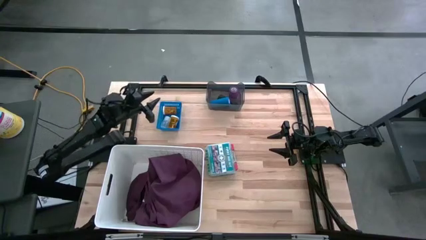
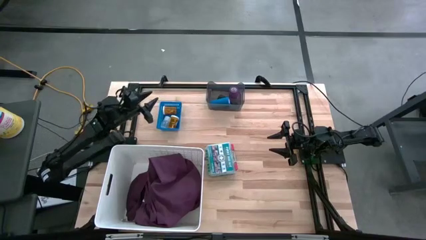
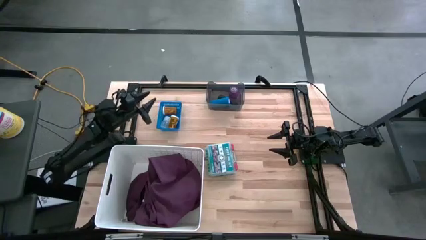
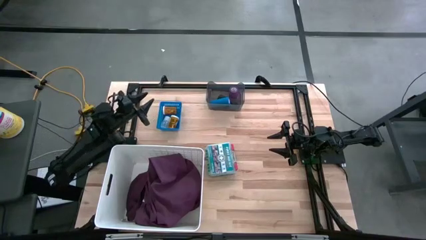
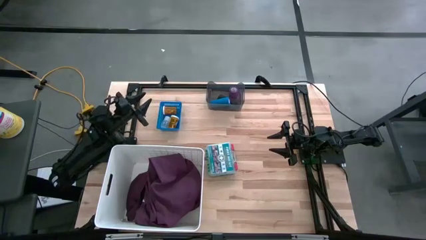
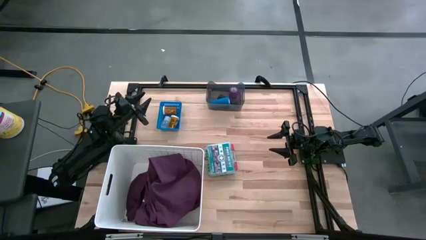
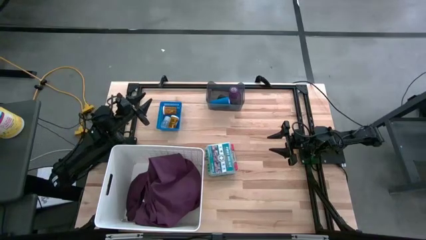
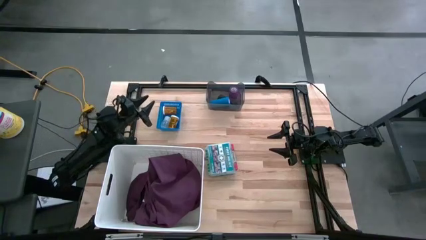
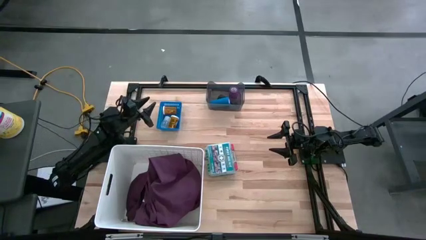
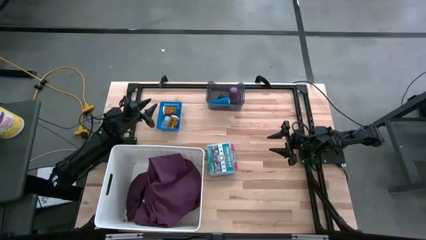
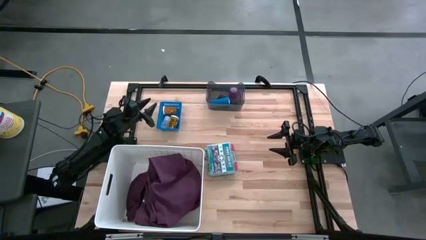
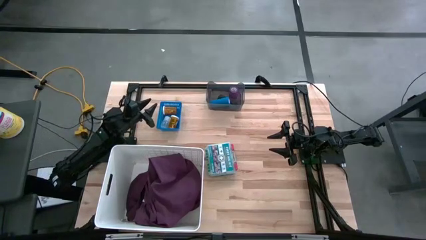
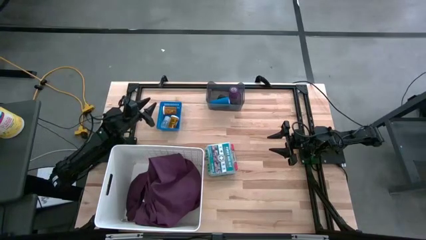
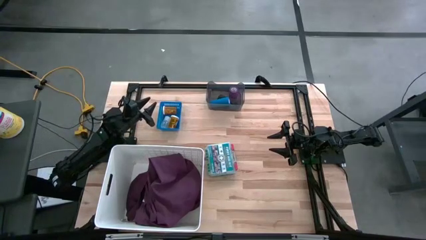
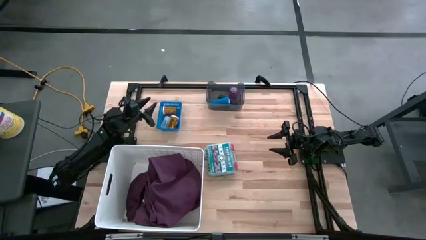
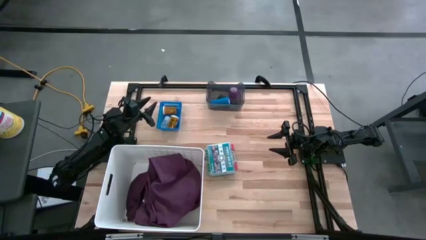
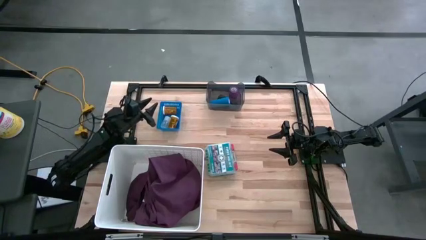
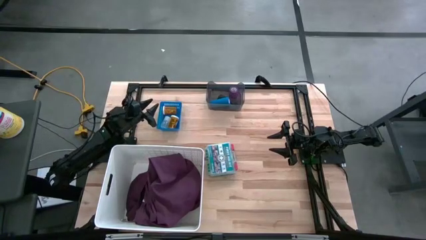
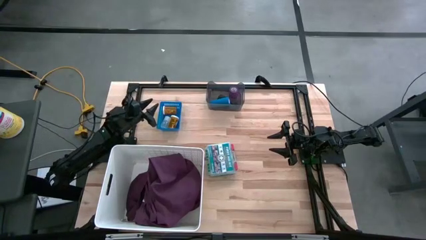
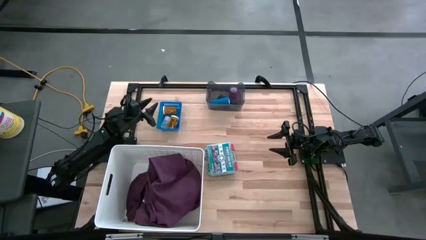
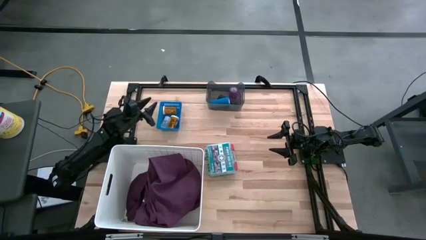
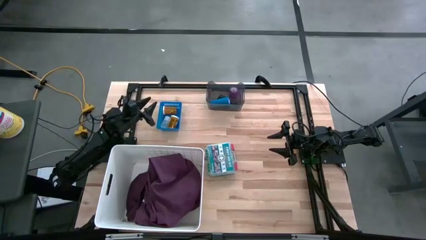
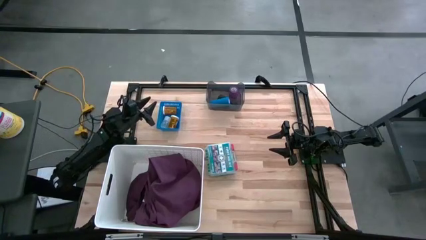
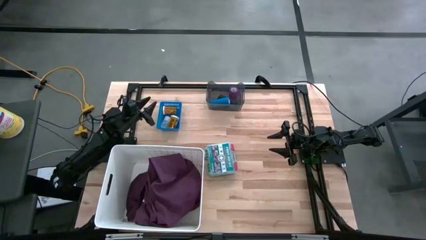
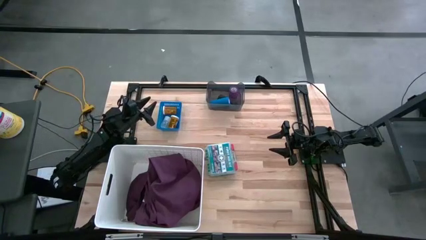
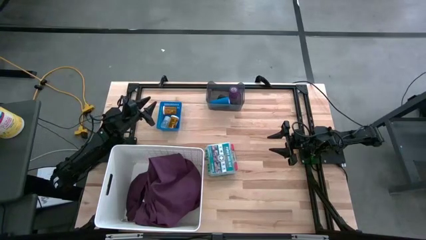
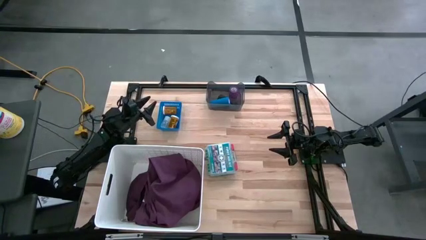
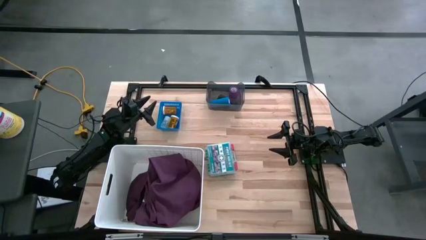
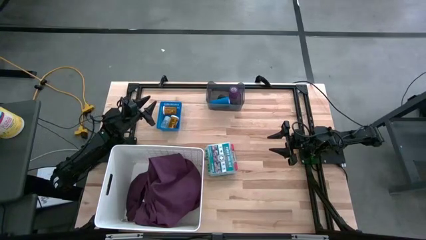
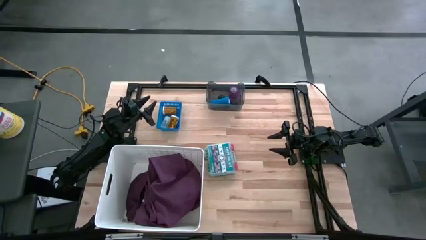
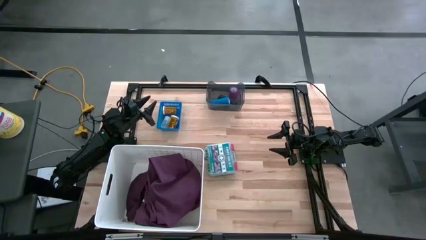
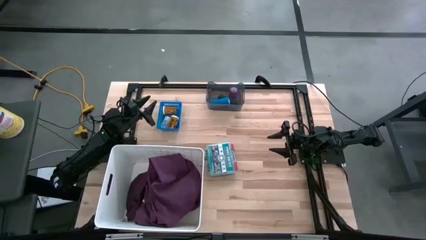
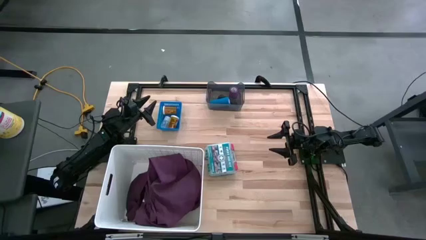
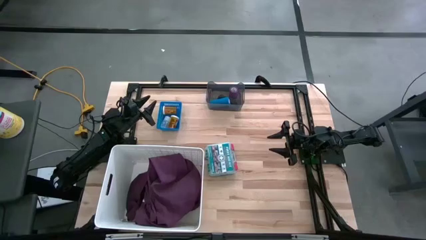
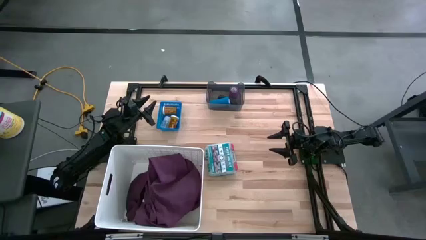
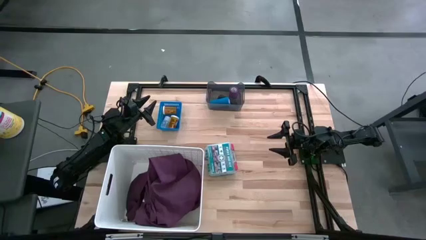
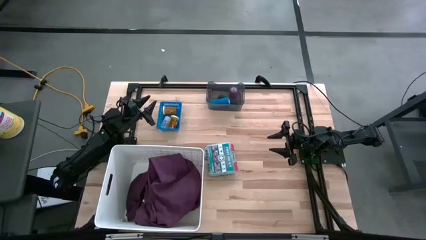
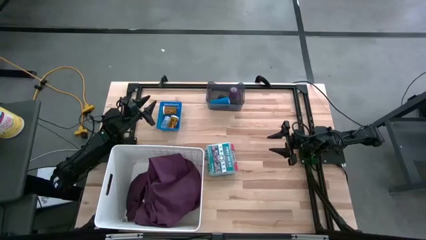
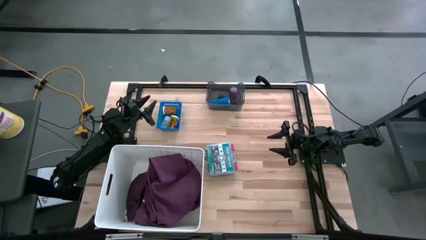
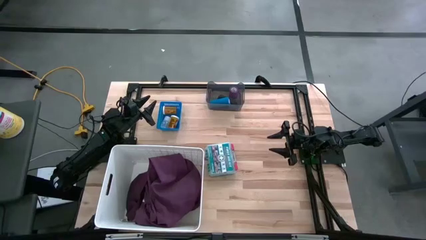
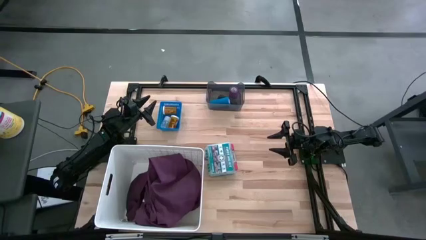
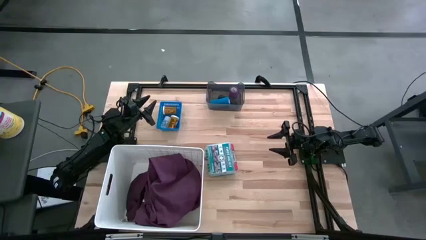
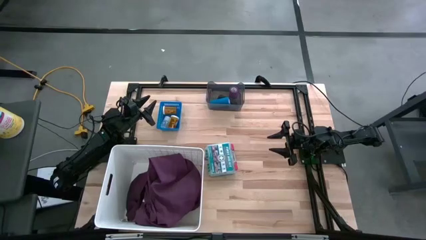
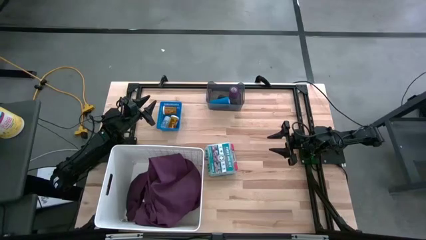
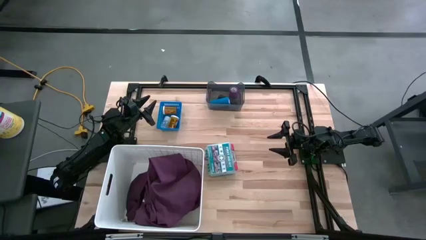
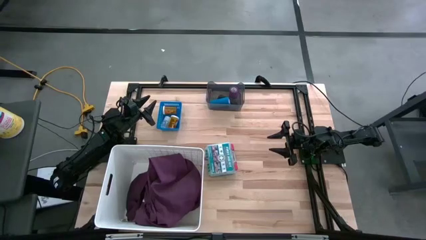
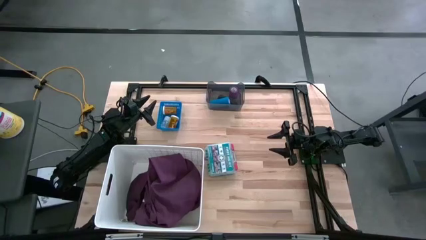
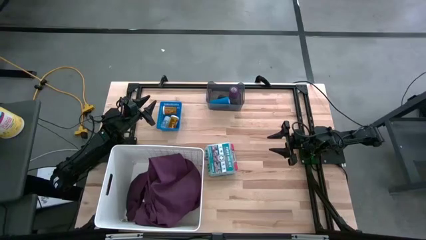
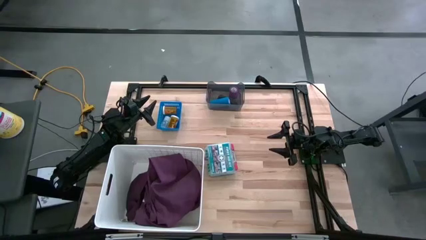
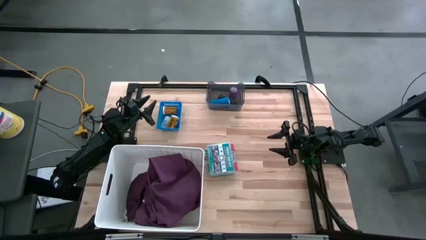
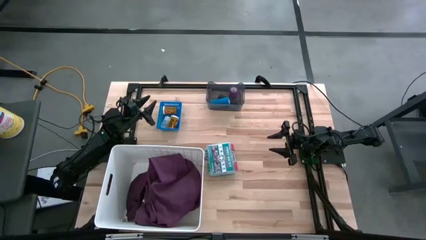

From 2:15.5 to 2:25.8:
Task: Pick & place medical supplies in basket/bin
Return to Home Position

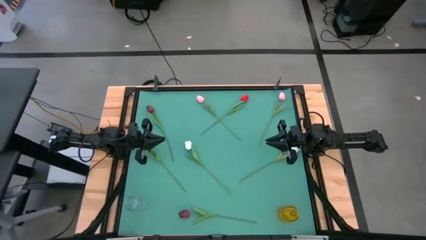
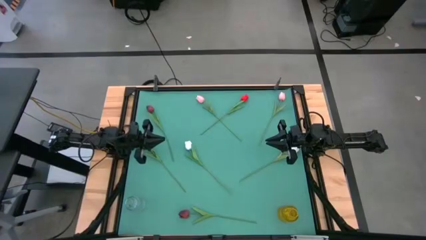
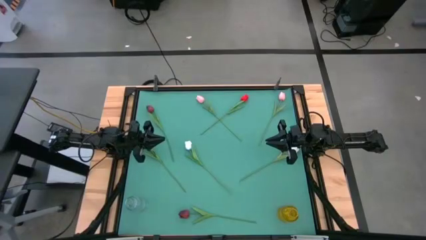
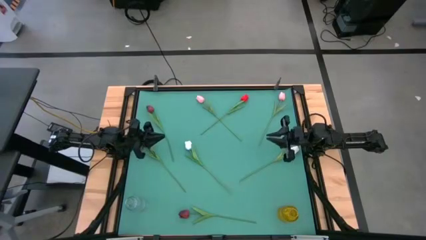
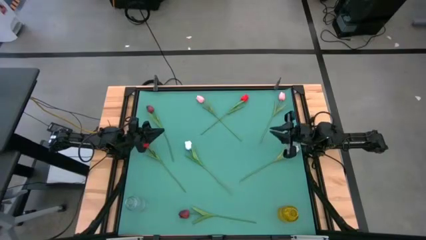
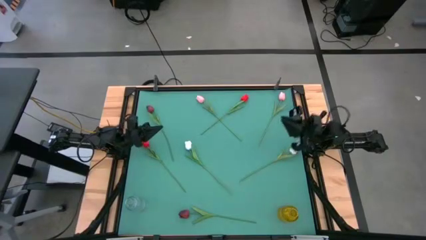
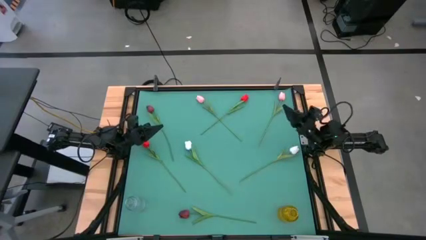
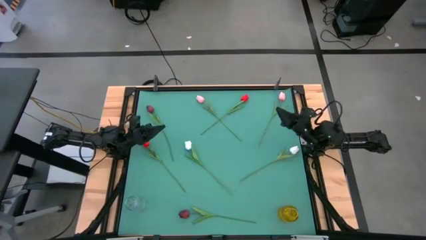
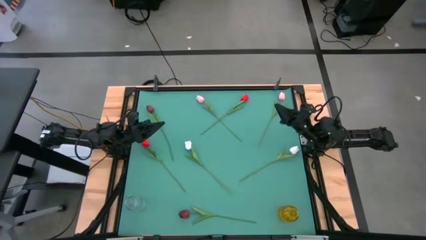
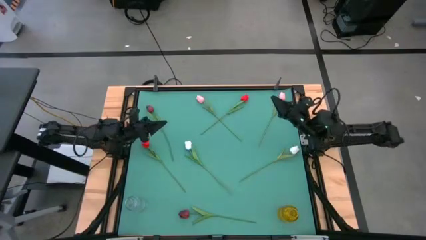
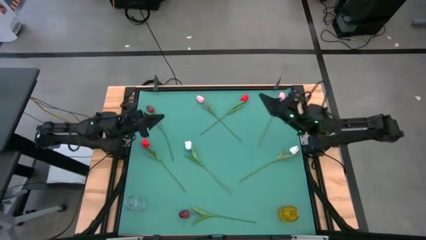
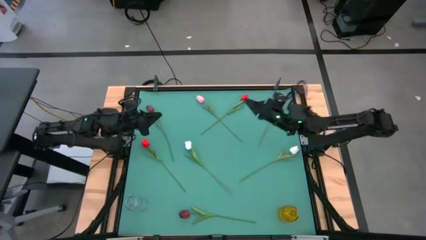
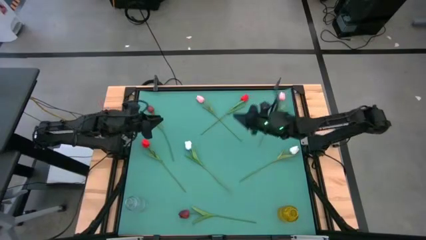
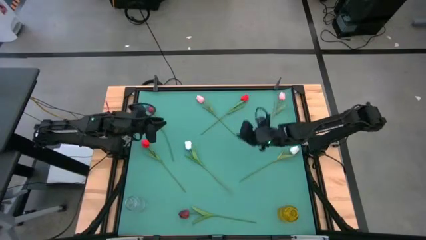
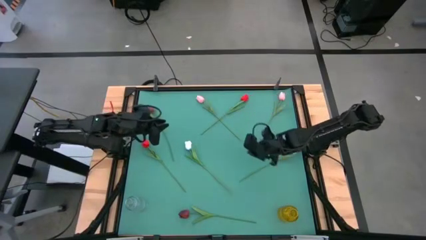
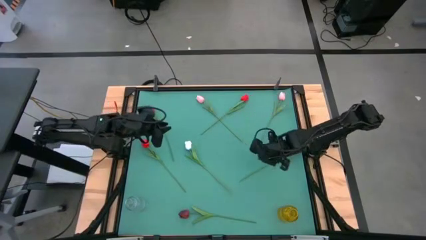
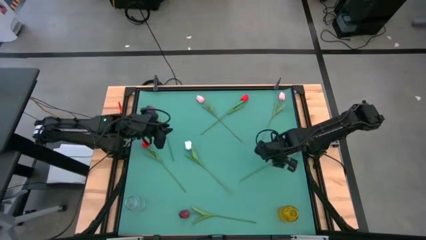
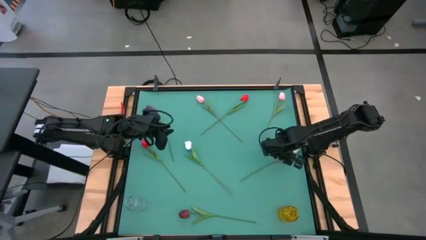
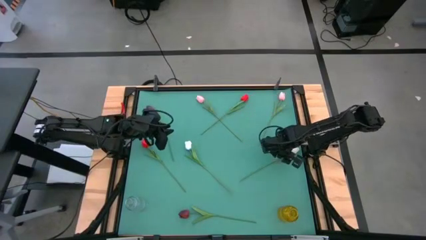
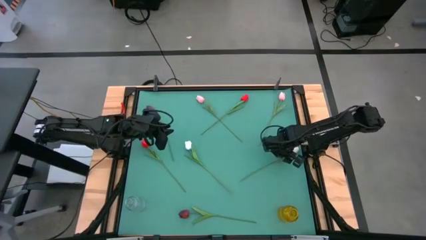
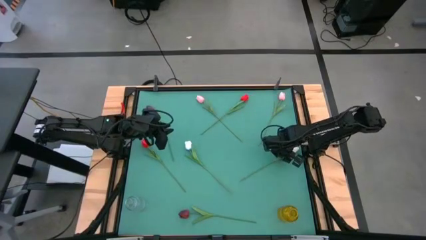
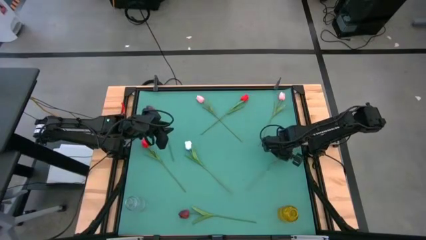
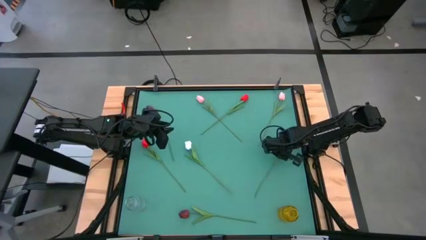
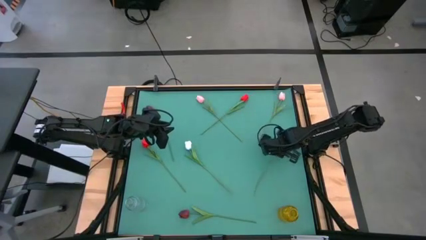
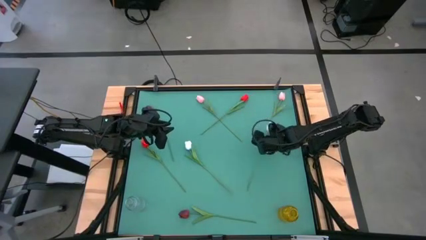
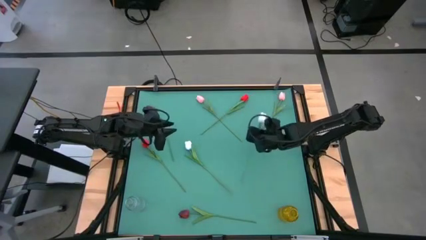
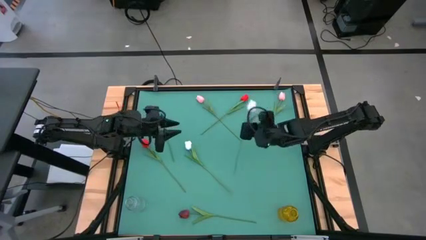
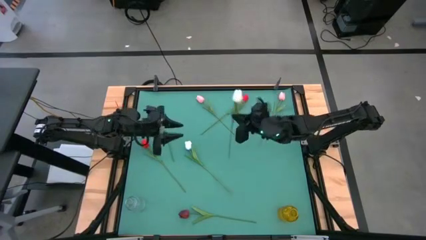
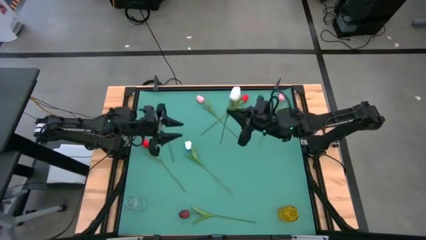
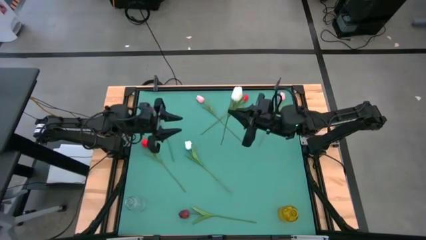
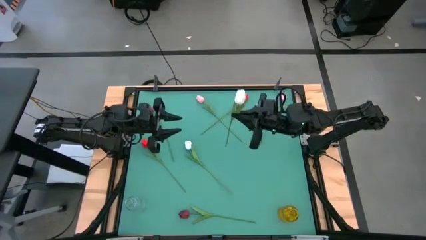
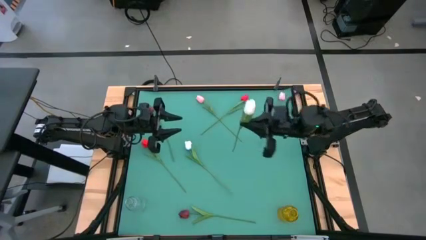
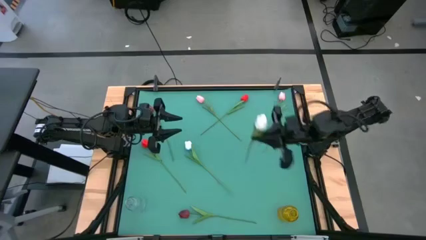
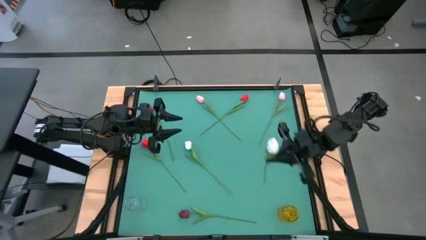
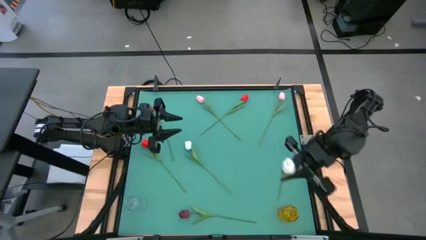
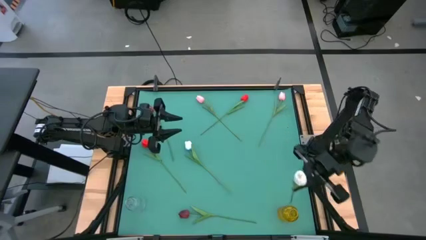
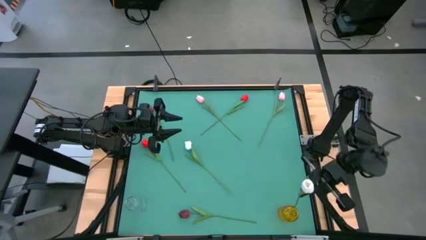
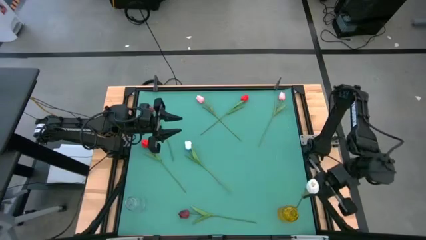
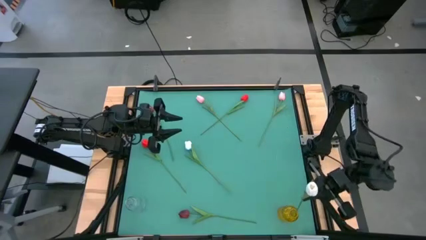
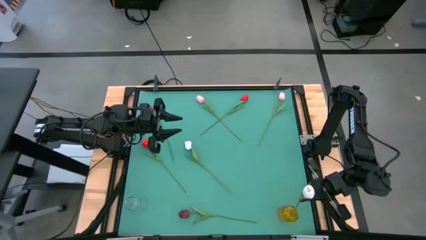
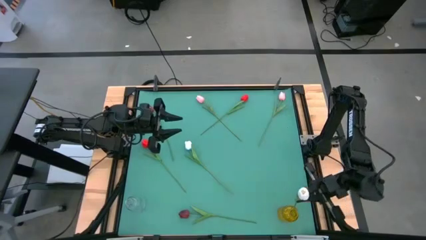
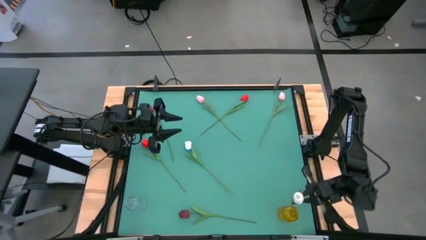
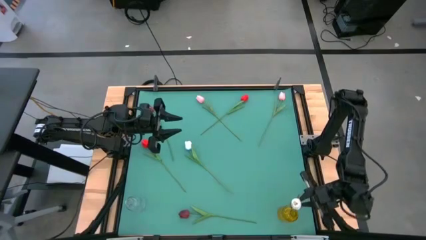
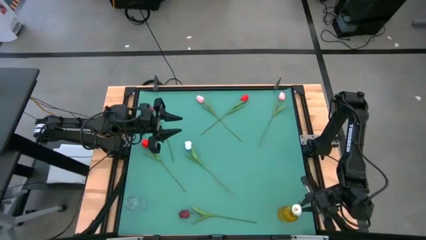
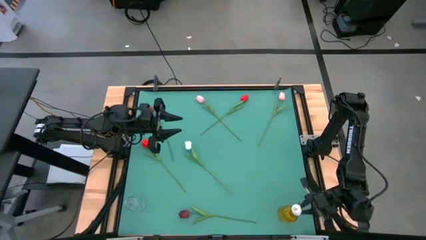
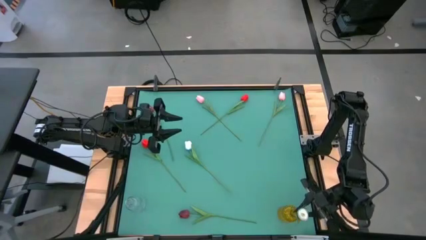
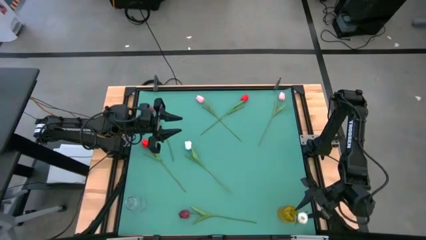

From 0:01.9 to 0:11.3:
Task: Sort flowers into vase by color
Put the right white tulip into the yellow flower vase
